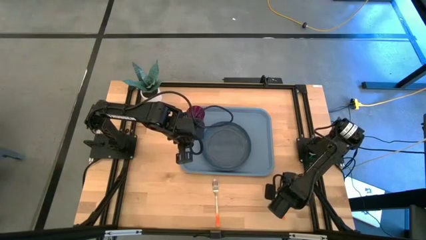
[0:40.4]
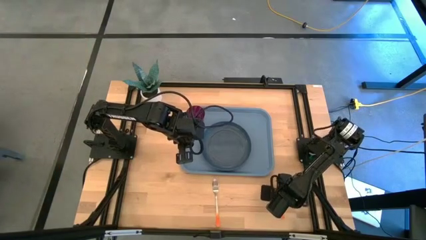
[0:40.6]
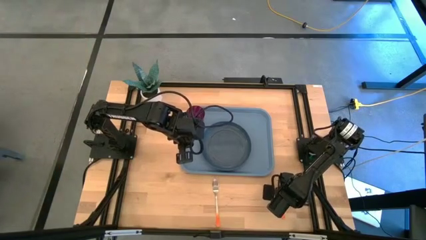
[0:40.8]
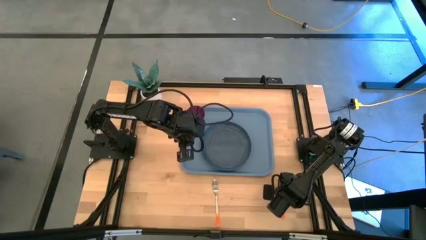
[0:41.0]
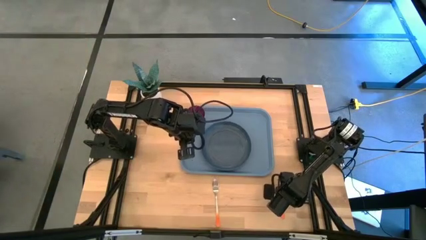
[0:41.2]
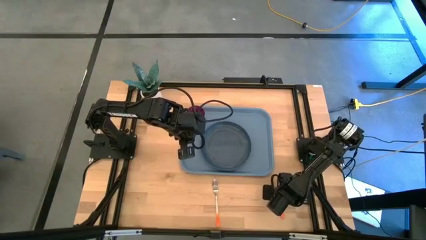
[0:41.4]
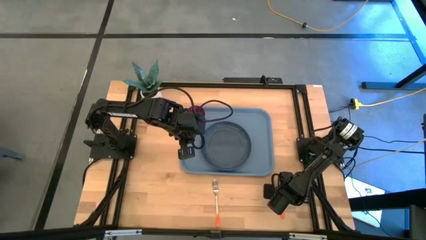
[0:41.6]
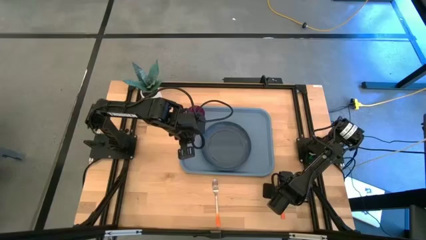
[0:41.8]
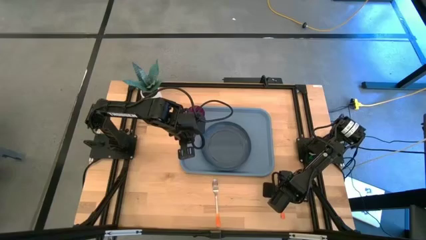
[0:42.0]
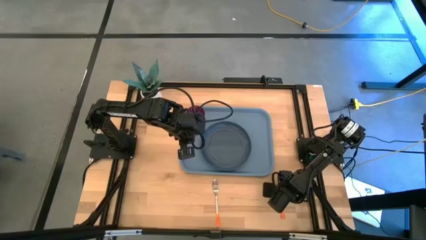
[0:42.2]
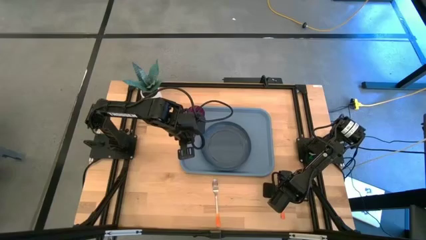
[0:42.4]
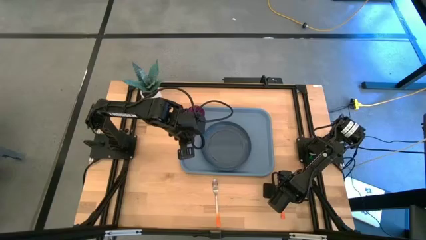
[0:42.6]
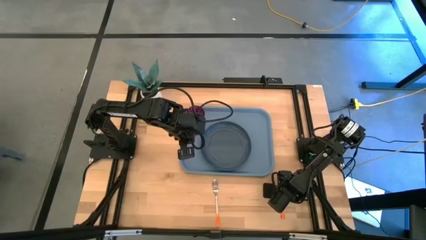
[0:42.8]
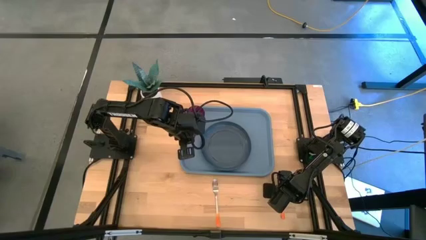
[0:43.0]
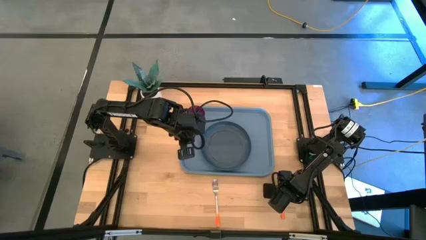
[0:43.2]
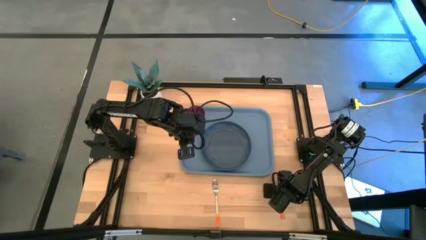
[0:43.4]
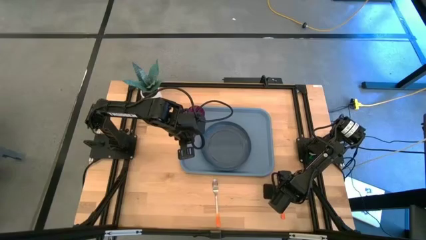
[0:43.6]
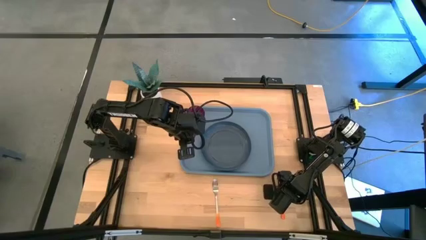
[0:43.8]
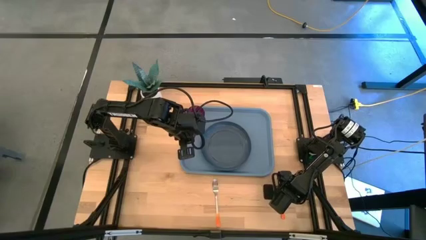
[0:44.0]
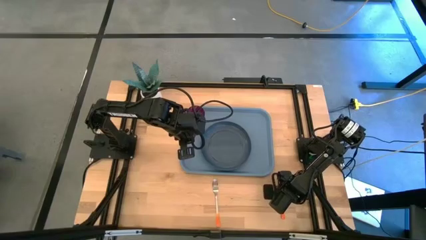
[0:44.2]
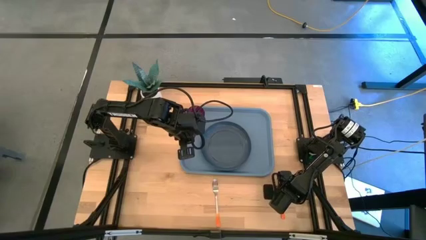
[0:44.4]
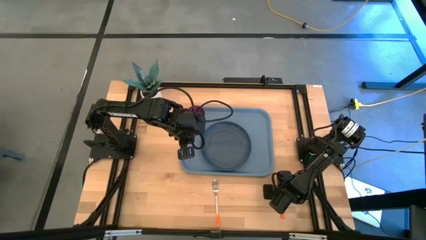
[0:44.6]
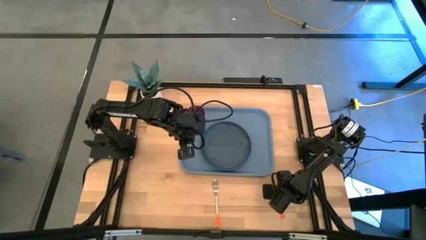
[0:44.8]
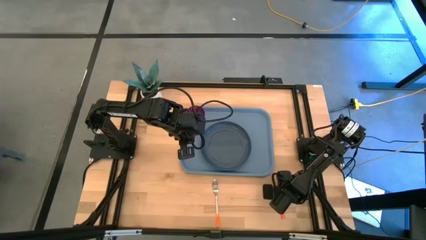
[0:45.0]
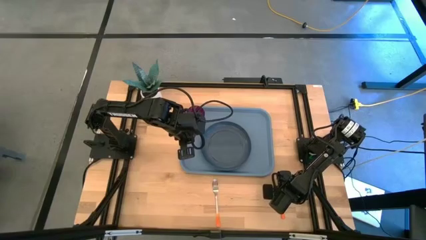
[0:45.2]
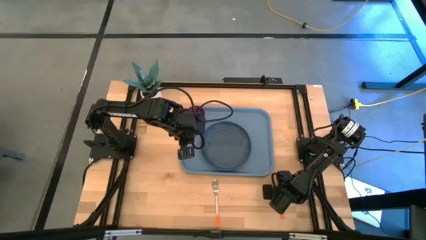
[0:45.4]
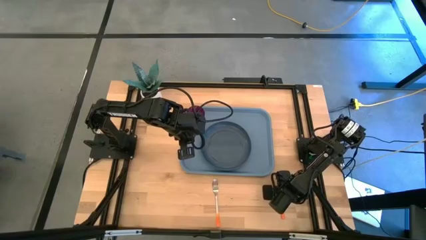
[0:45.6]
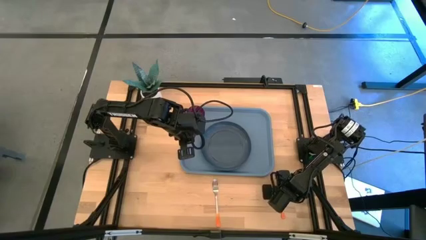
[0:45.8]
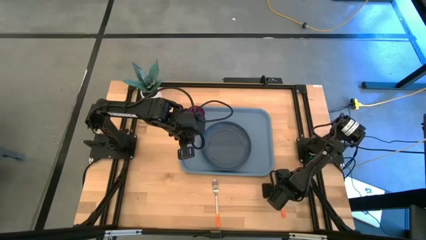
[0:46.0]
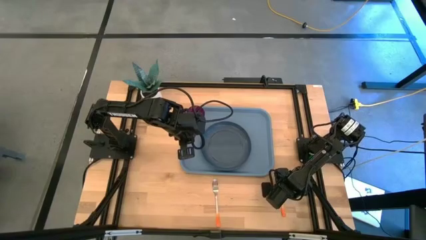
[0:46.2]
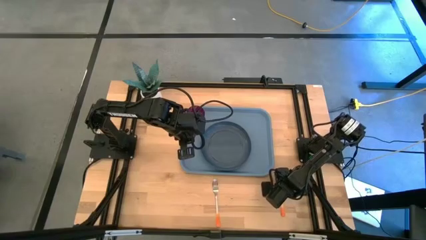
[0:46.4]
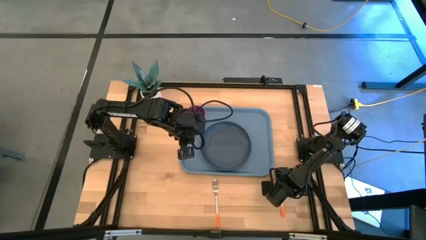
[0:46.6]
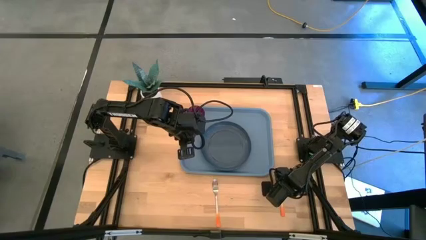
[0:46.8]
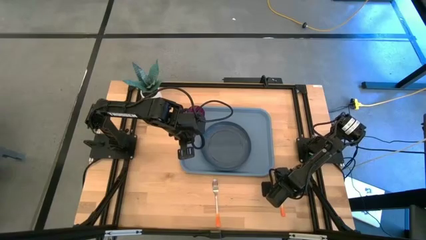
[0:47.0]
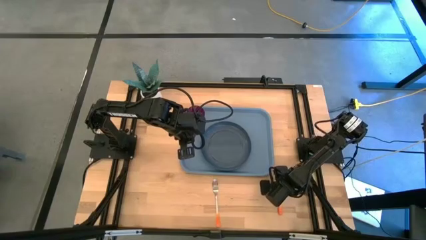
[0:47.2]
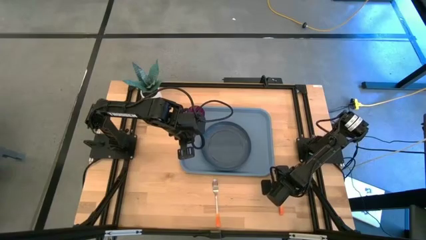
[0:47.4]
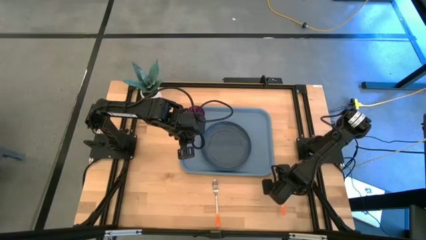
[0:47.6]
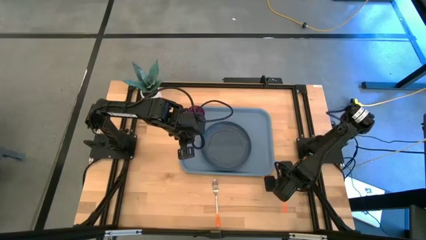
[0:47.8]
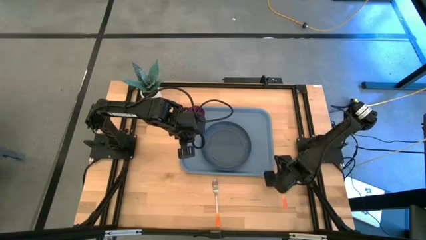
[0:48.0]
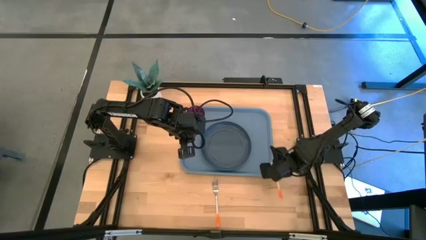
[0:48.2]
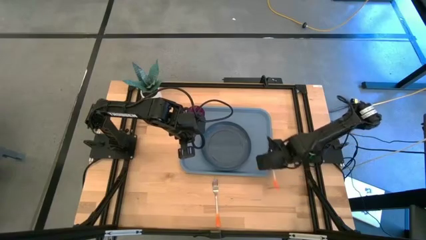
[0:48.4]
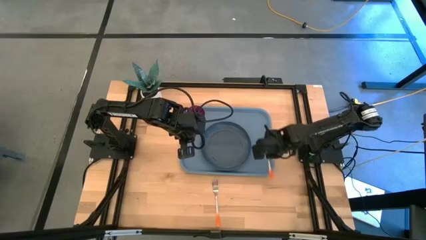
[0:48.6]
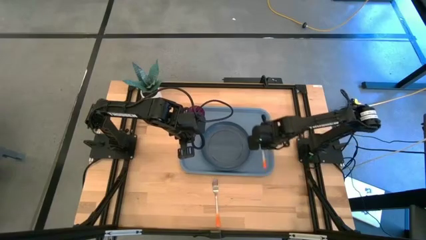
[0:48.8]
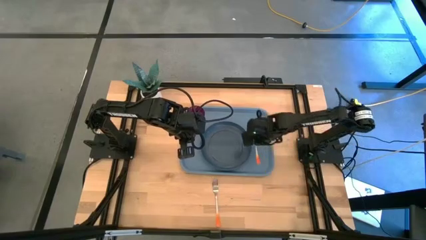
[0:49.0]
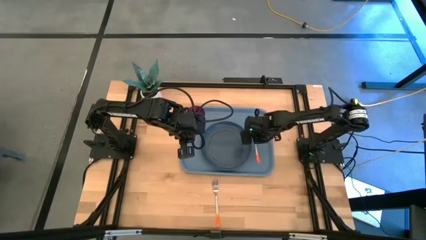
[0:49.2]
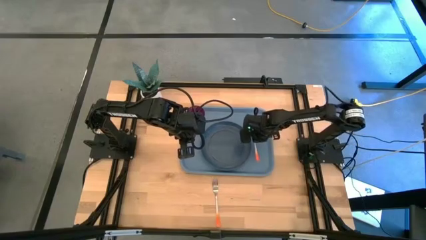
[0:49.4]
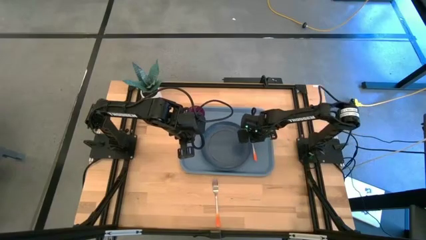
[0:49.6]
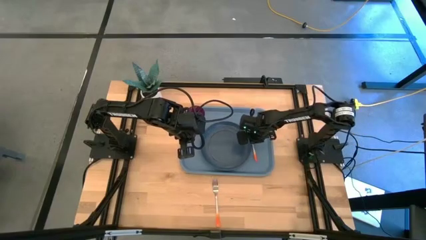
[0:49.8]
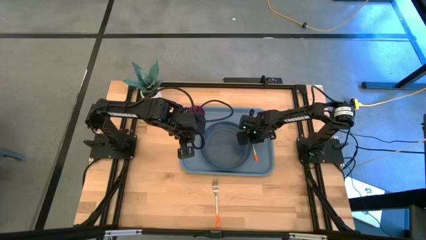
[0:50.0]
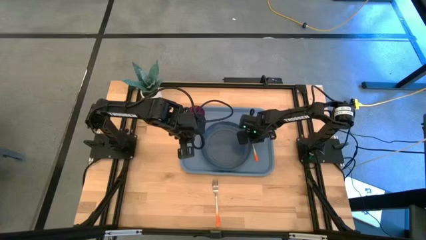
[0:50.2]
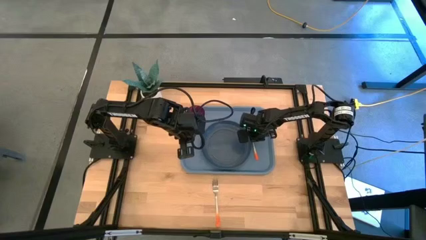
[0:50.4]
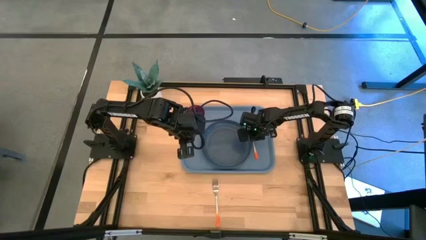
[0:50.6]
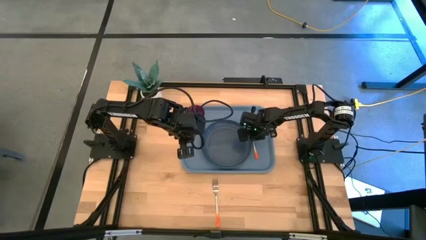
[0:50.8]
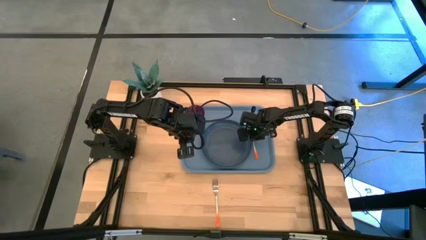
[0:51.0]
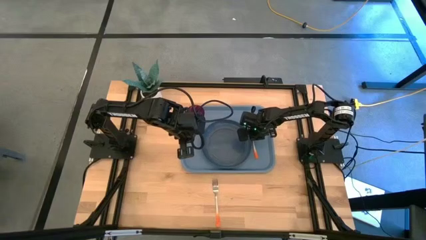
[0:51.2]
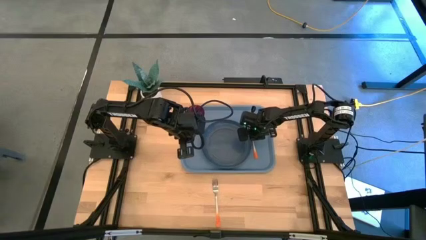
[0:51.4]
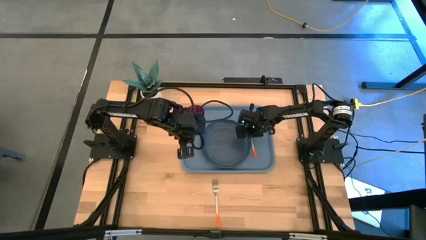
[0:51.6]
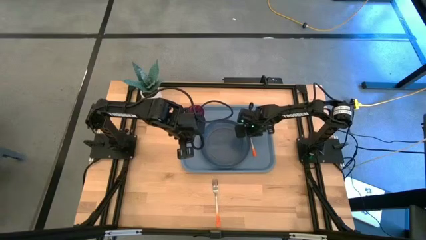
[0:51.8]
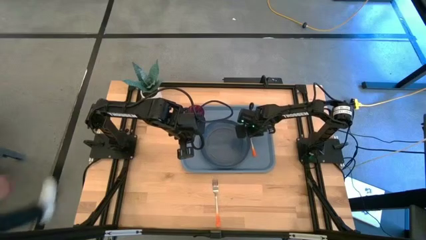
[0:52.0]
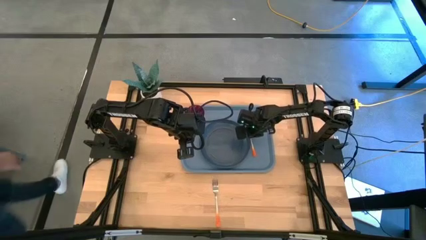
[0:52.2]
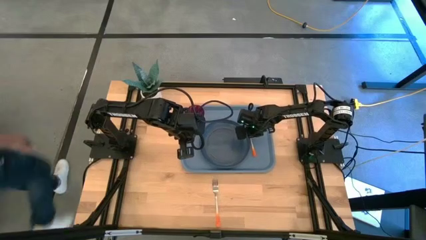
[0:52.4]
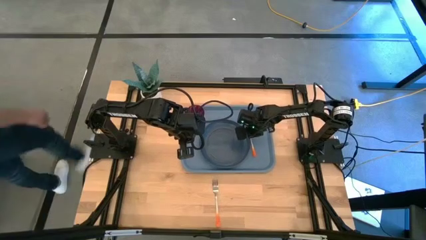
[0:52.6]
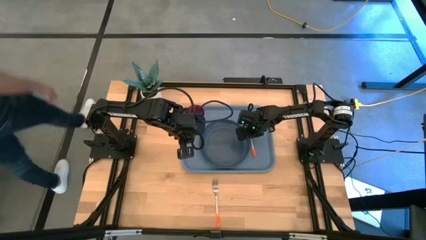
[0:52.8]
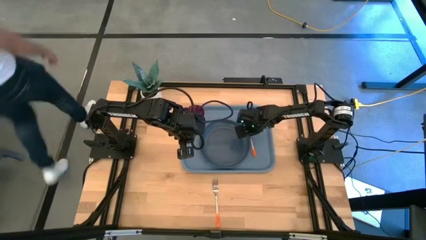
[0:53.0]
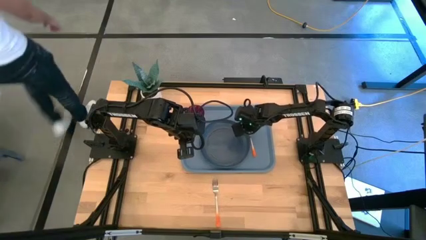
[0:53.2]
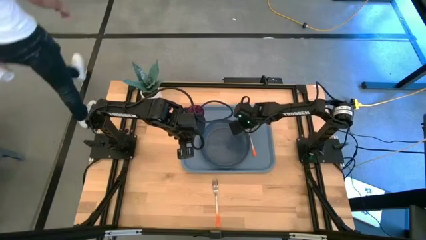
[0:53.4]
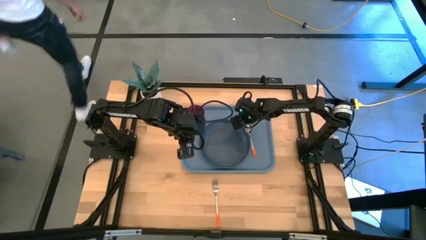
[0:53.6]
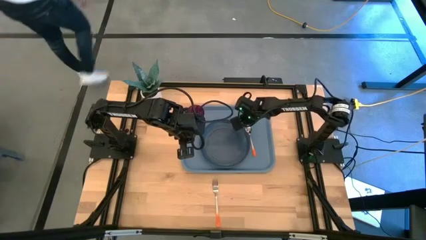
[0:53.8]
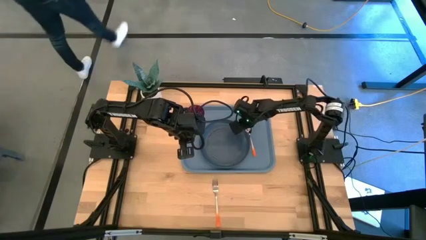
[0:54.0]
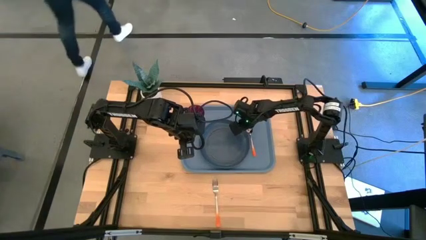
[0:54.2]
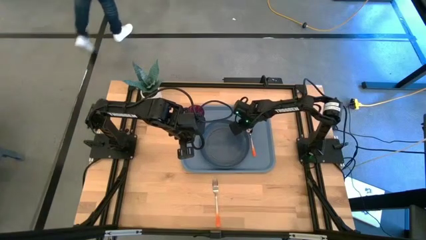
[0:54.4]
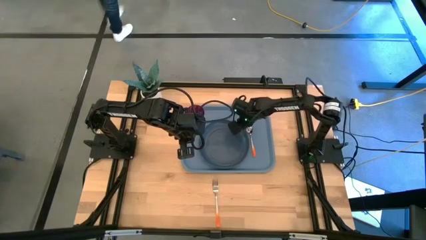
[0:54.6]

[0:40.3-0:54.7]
Task: Pick and place plate/cup/fork/spoon on tray
Put the orange spoon on the light blue tray to the right of the blue plate

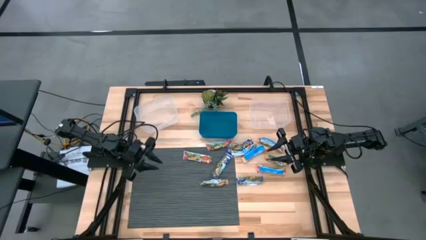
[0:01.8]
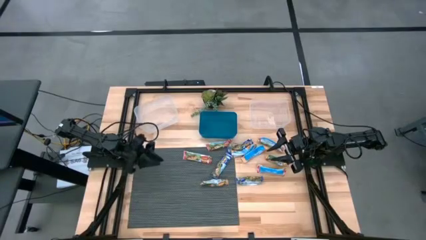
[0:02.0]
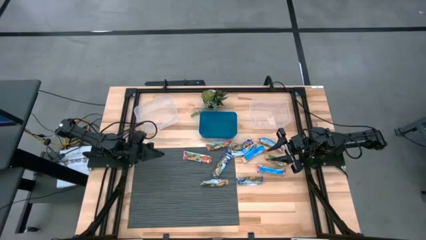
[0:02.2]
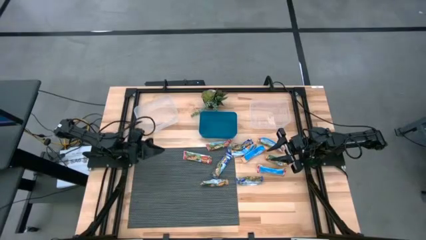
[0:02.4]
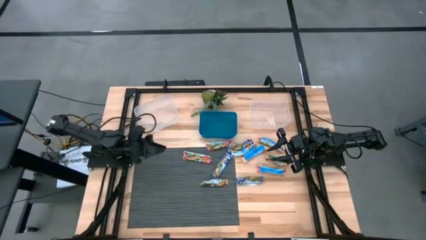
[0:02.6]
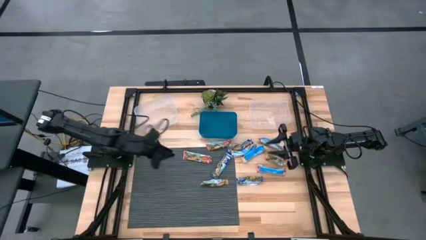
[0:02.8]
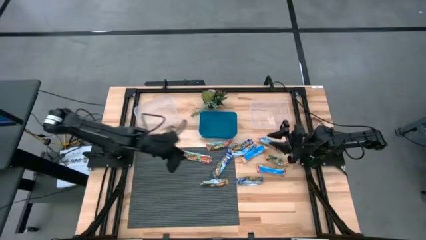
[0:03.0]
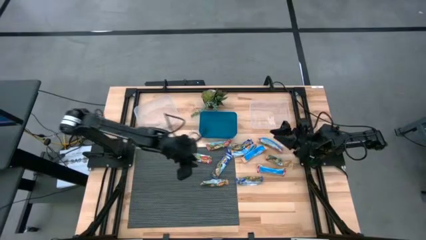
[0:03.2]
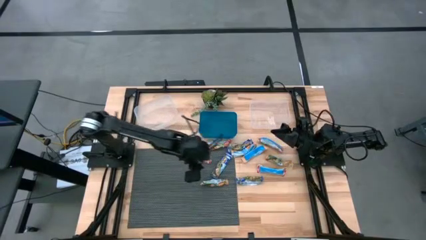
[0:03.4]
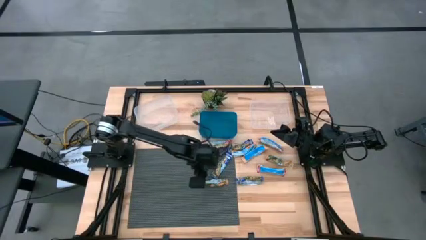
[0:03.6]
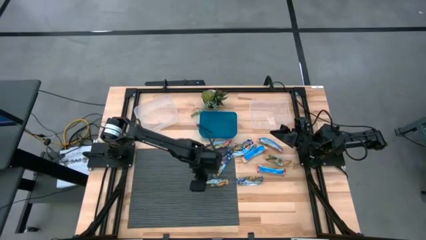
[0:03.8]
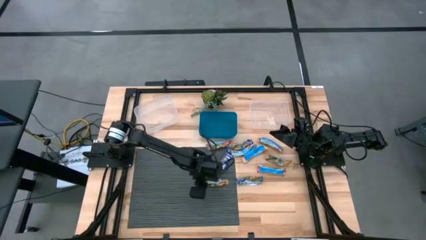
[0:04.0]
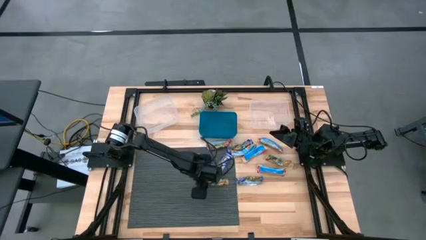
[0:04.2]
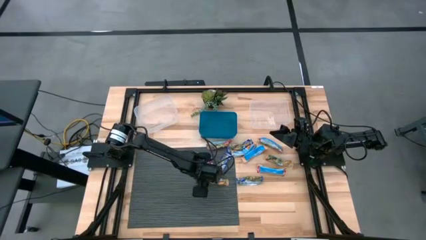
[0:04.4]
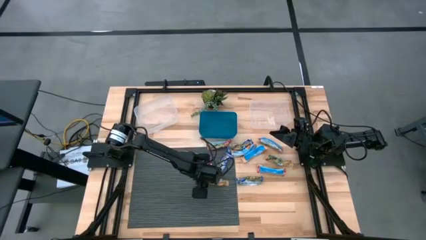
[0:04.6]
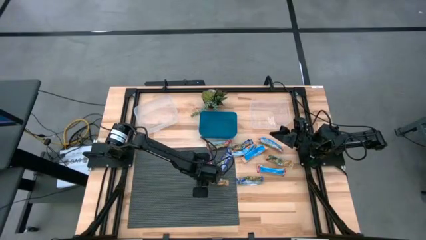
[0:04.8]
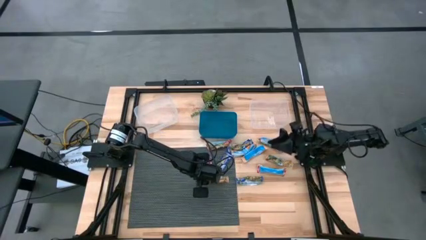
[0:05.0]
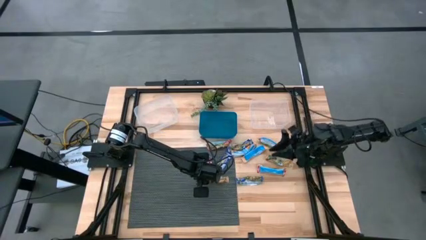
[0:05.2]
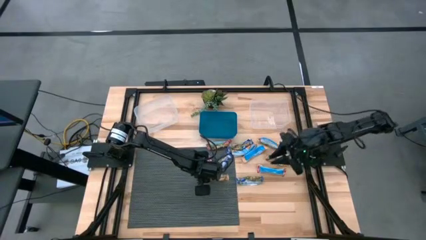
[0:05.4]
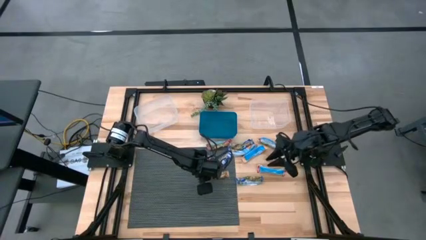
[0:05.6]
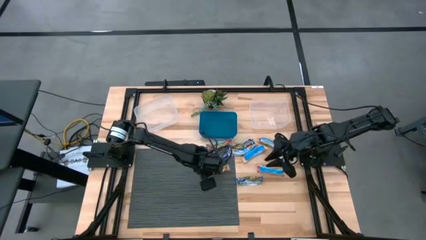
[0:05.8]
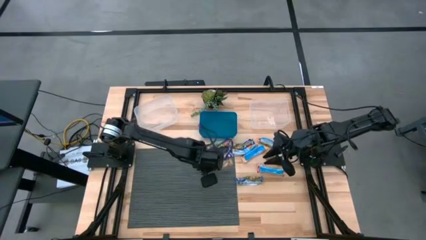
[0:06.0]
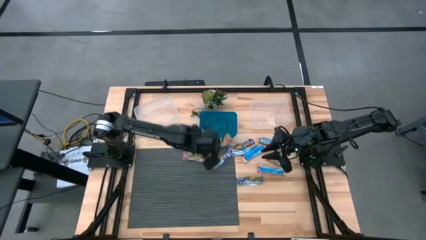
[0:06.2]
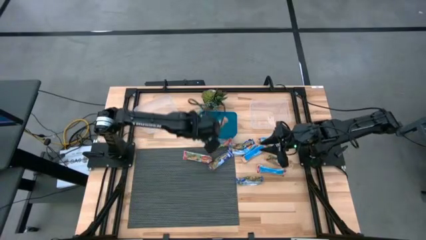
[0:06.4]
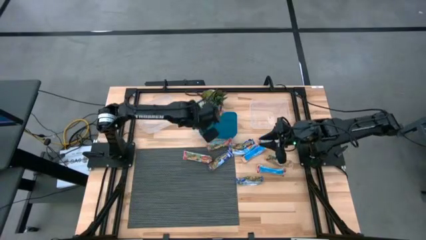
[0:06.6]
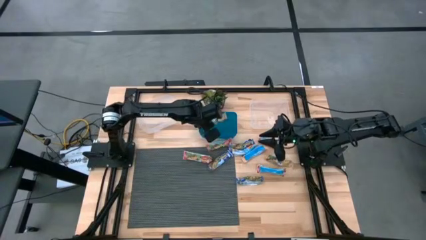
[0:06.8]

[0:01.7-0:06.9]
Task: Pick and place Granola Bars by type
Put the yellow granola bar into the blue bin
